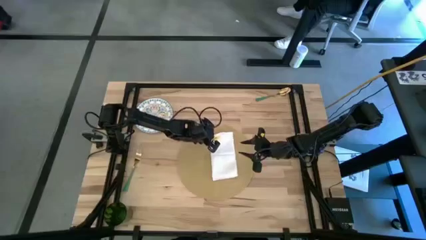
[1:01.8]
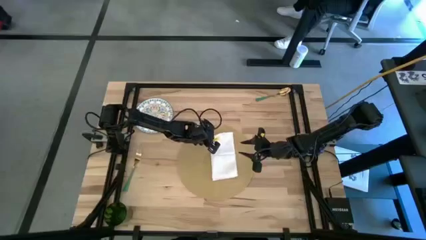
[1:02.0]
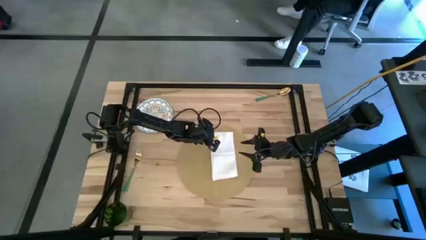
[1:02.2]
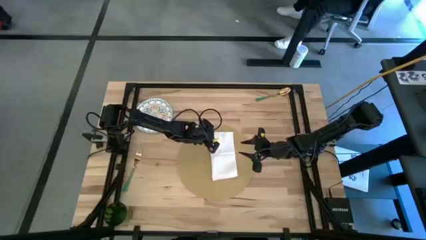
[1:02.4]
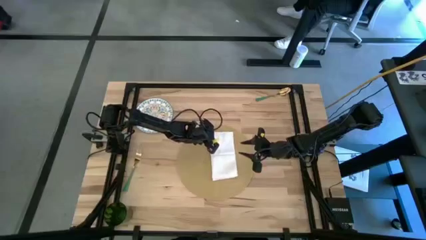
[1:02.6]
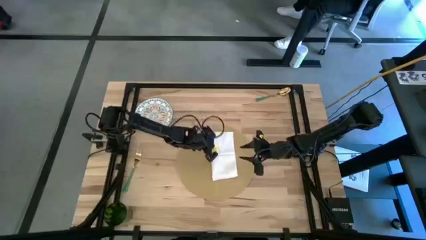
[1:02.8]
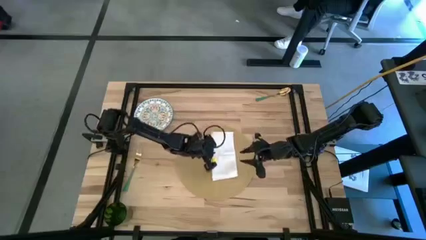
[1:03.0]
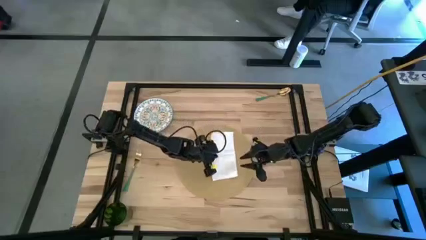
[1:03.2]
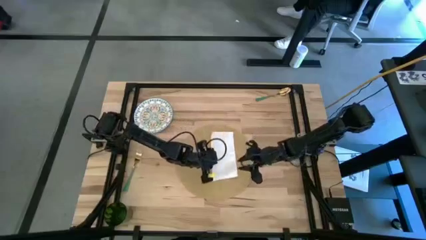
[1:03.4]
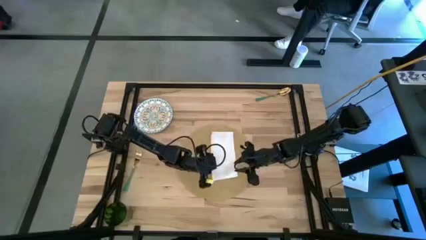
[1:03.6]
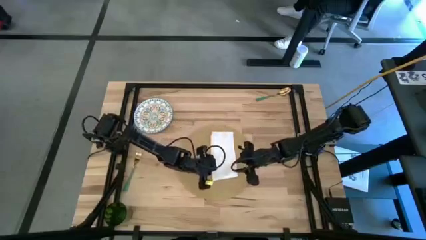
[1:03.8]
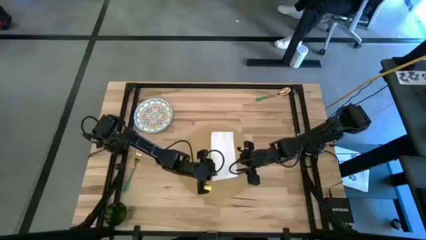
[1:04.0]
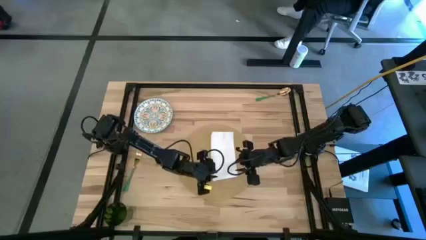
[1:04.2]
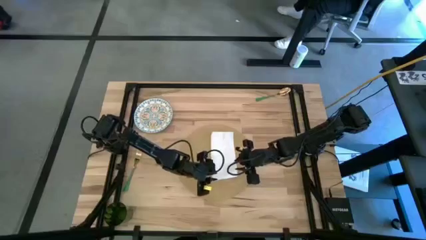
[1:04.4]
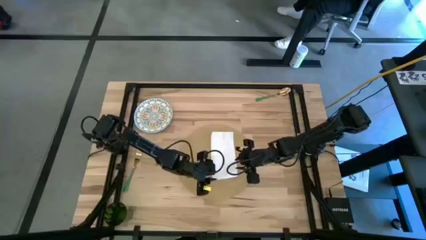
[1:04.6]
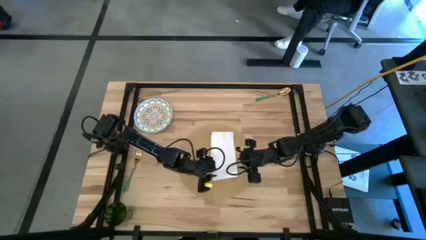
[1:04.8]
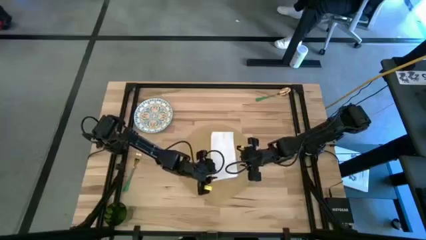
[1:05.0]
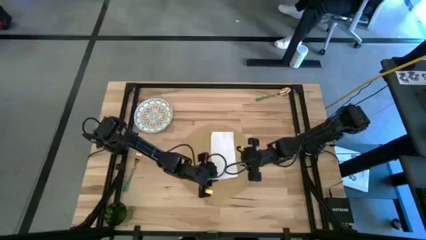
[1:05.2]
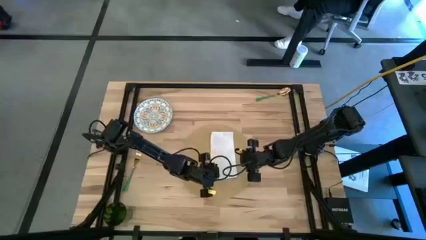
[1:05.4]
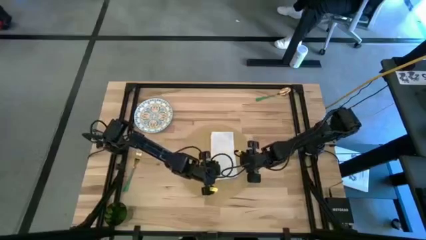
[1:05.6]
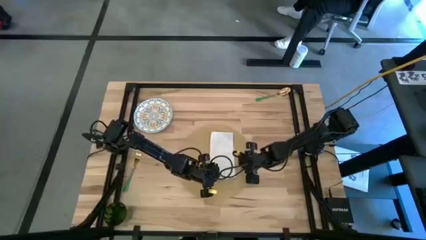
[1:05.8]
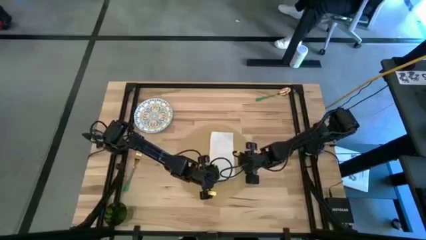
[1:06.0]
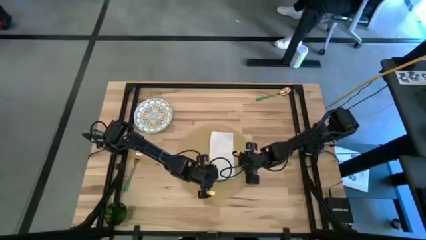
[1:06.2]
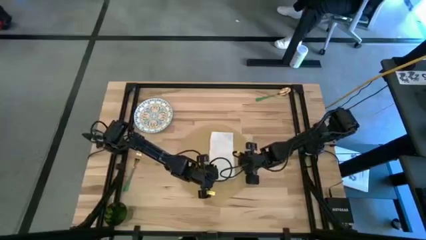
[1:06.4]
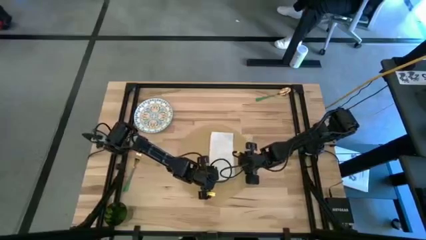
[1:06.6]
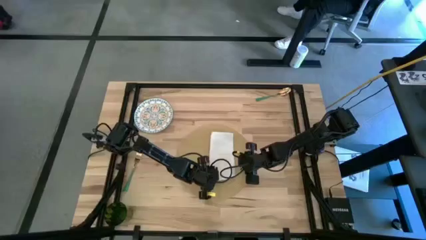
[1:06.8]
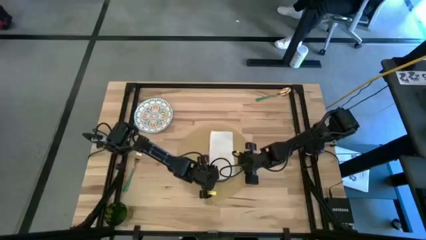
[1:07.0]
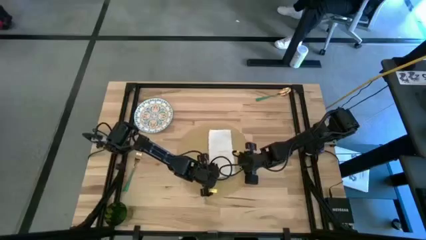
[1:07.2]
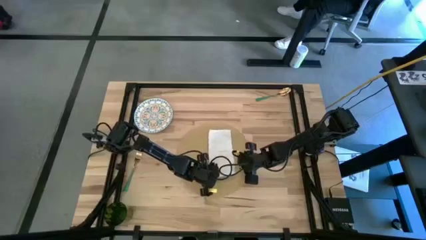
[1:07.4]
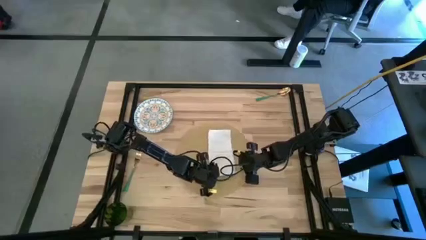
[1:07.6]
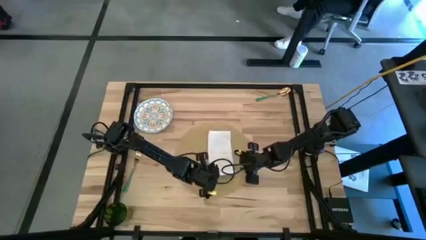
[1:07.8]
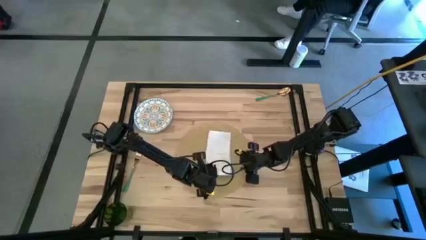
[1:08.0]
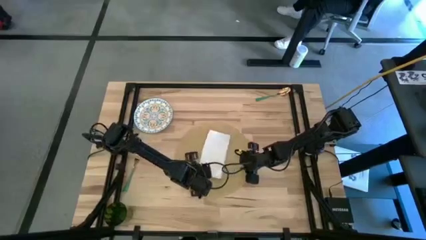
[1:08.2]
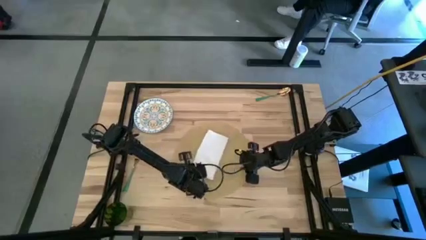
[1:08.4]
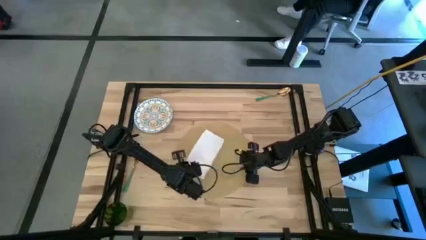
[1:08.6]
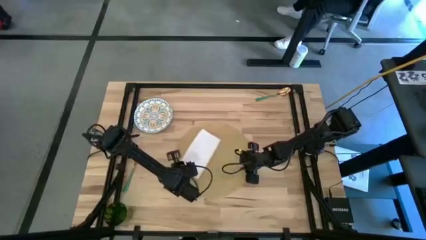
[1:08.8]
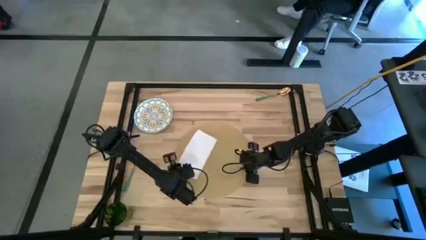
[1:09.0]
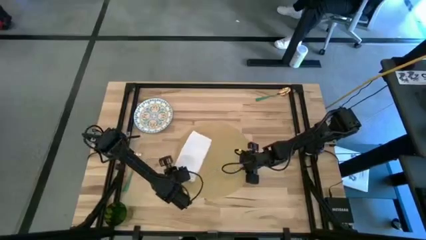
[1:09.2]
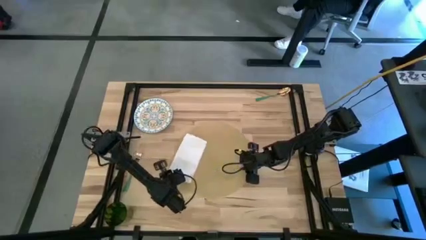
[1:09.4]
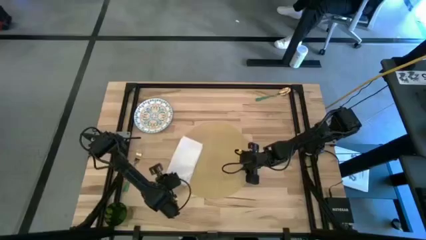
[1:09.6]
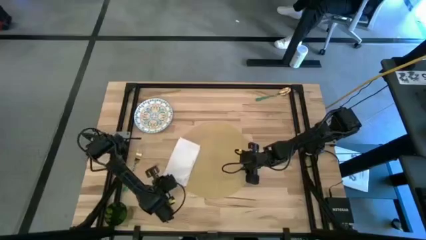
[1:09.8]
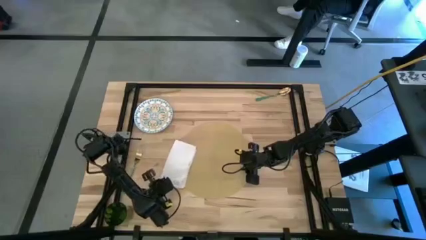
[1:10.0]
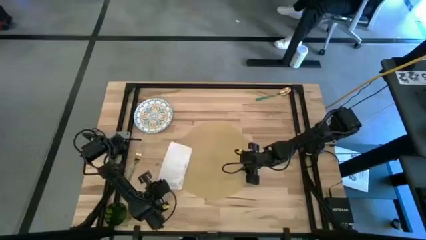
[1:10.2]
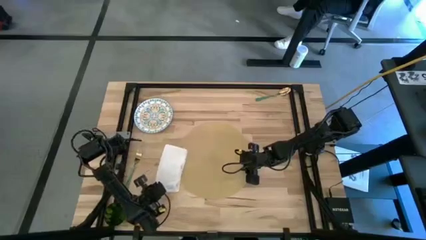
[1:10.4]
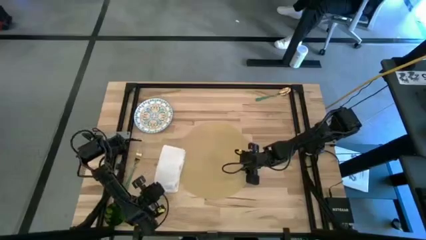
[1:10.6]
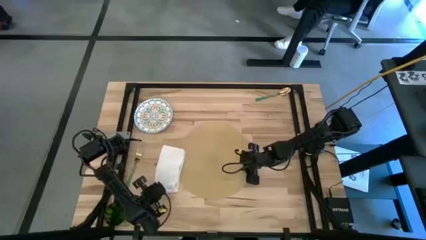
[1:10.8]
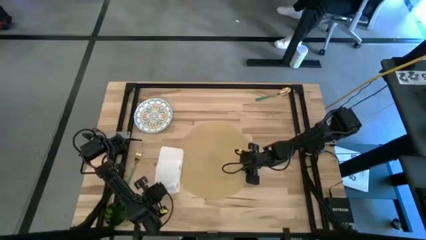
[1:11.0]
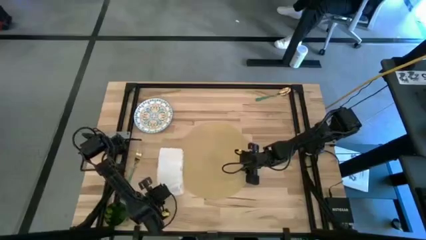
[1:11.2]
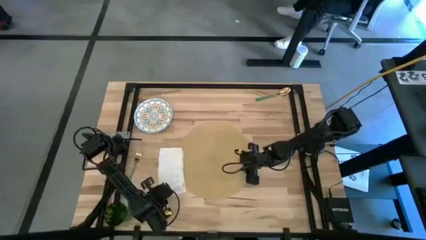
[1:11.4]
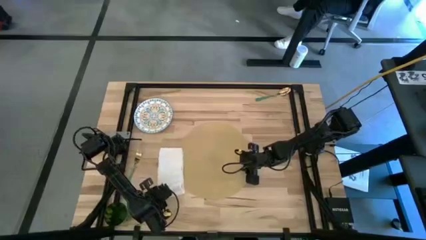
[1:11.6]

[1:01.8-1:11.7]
Task: Set table place
Fold the table napkin
